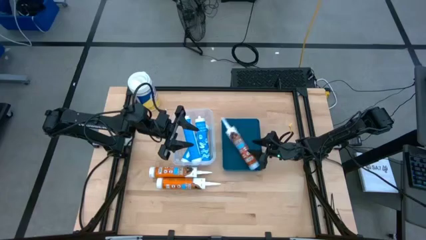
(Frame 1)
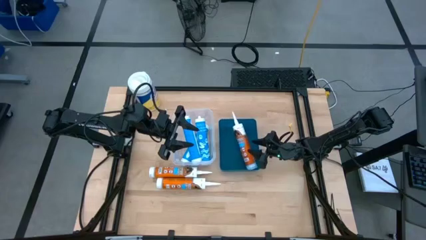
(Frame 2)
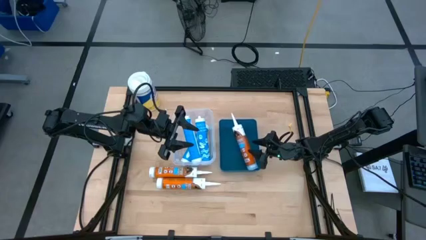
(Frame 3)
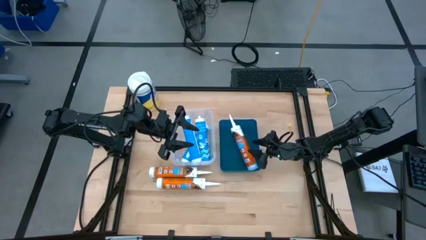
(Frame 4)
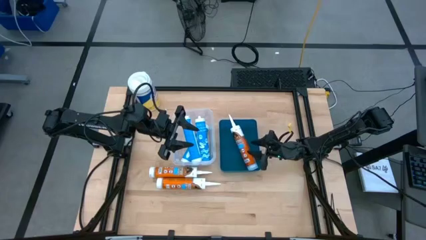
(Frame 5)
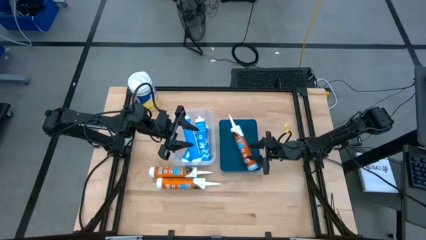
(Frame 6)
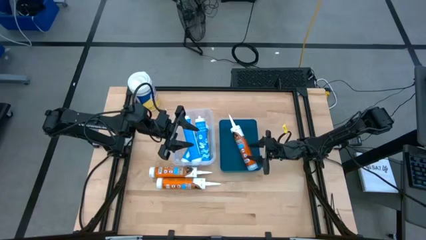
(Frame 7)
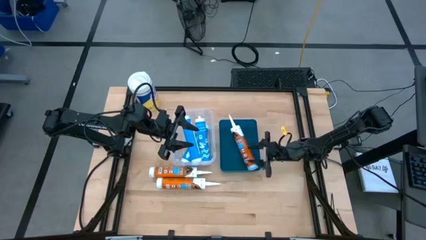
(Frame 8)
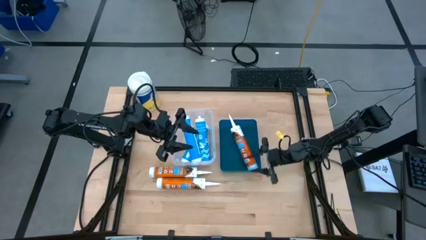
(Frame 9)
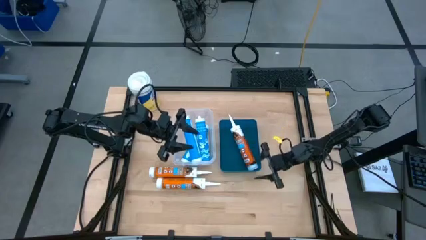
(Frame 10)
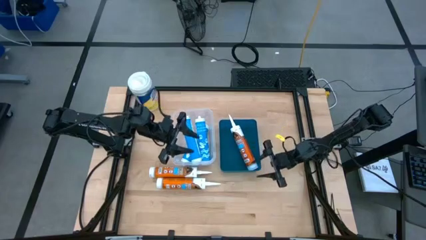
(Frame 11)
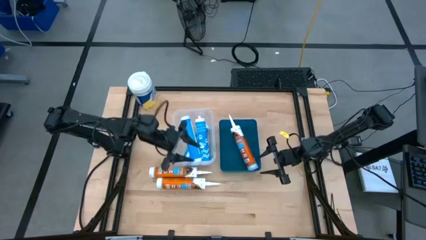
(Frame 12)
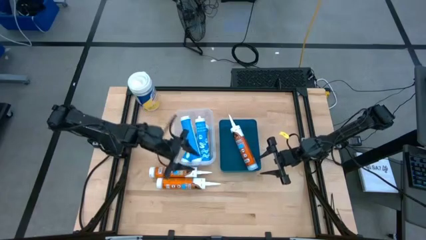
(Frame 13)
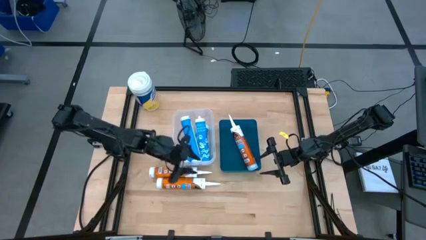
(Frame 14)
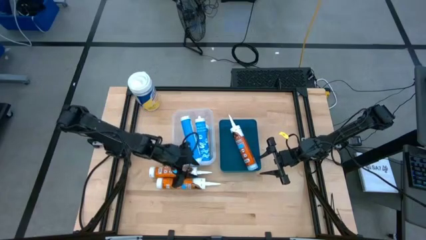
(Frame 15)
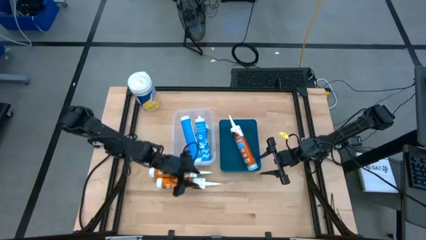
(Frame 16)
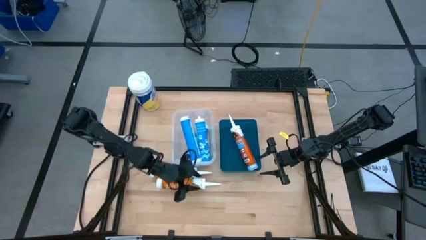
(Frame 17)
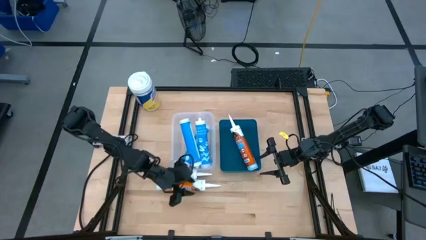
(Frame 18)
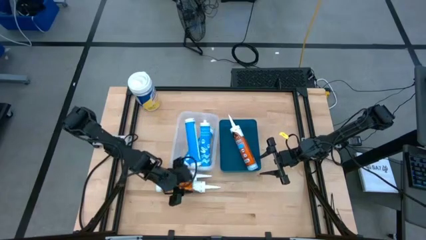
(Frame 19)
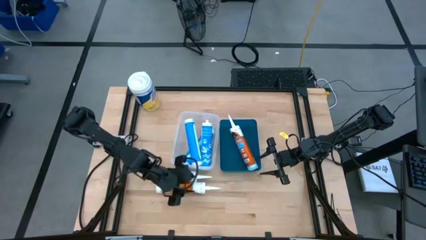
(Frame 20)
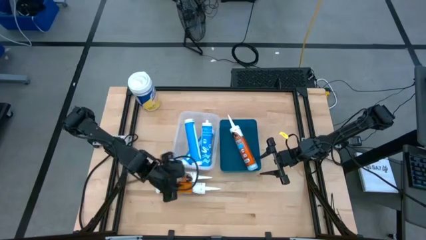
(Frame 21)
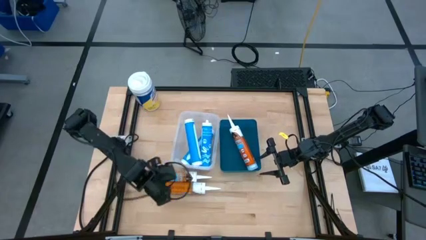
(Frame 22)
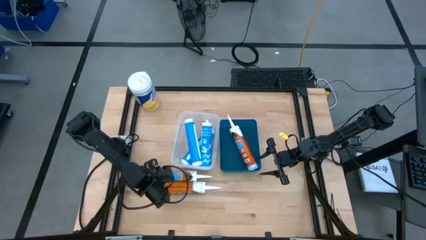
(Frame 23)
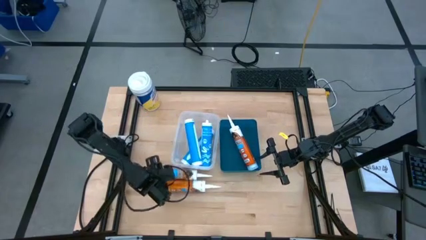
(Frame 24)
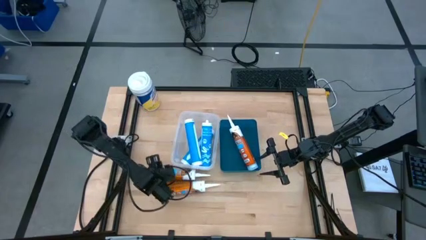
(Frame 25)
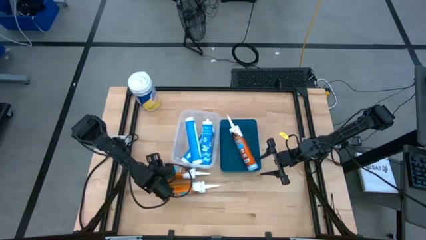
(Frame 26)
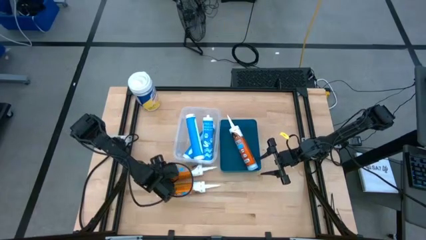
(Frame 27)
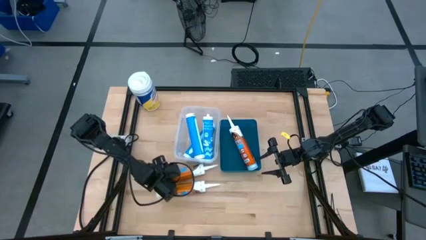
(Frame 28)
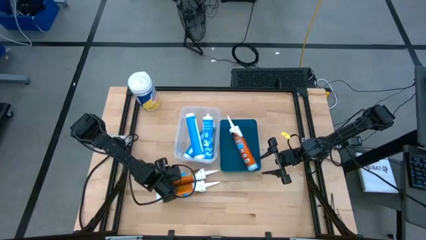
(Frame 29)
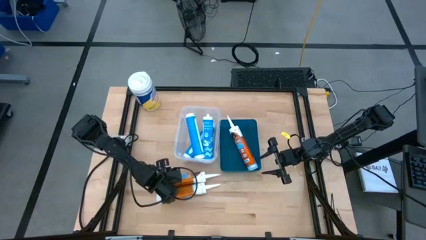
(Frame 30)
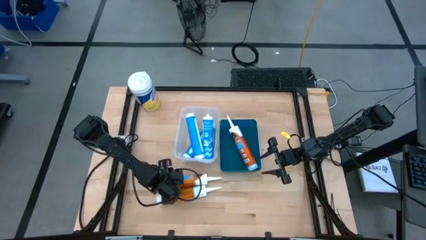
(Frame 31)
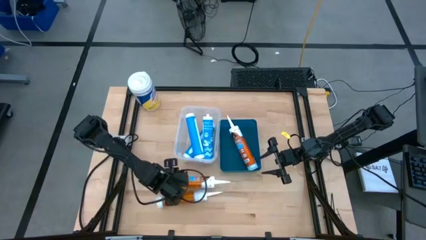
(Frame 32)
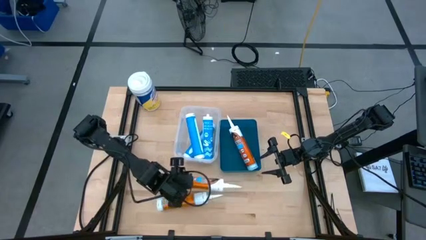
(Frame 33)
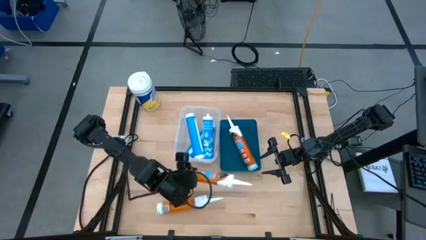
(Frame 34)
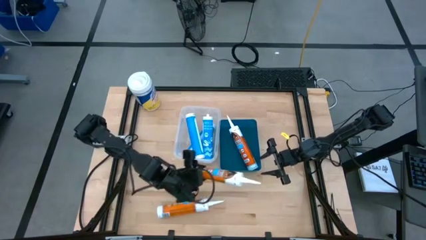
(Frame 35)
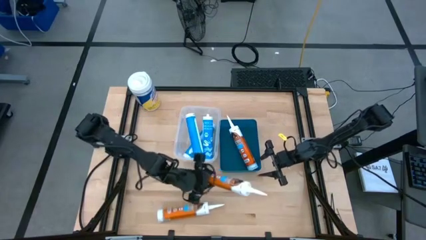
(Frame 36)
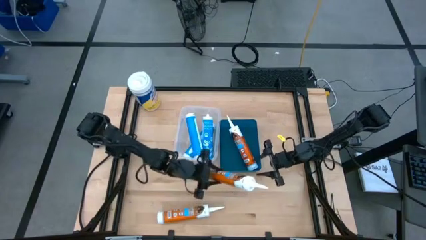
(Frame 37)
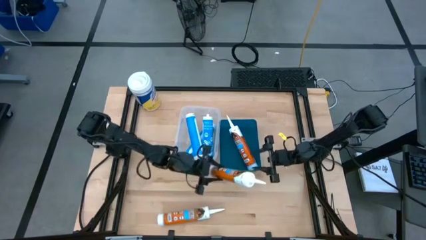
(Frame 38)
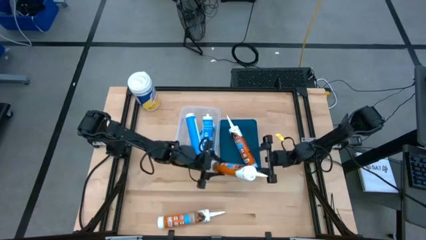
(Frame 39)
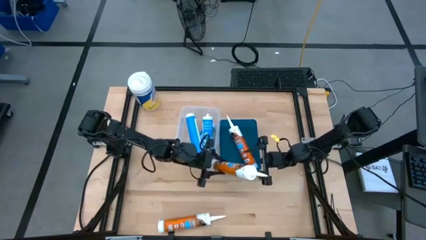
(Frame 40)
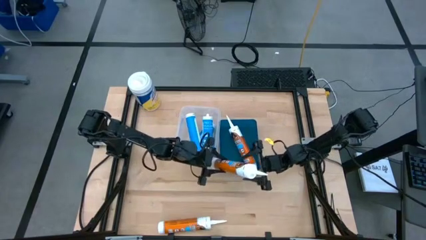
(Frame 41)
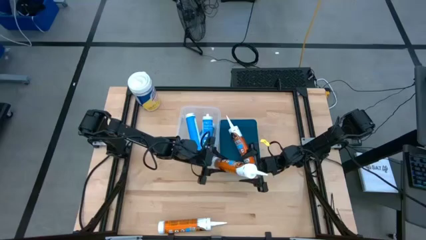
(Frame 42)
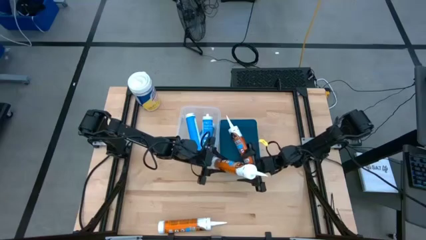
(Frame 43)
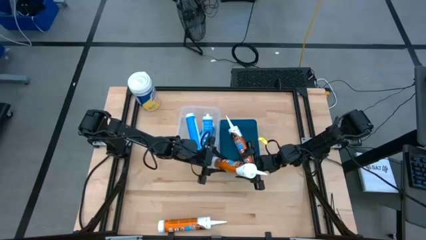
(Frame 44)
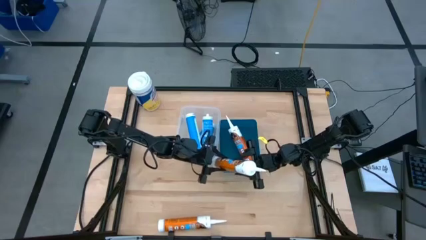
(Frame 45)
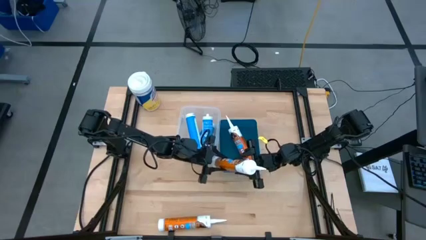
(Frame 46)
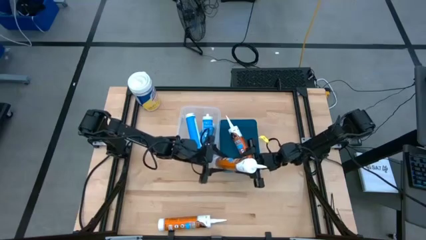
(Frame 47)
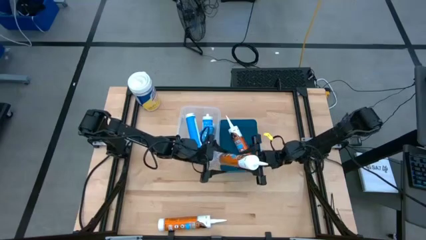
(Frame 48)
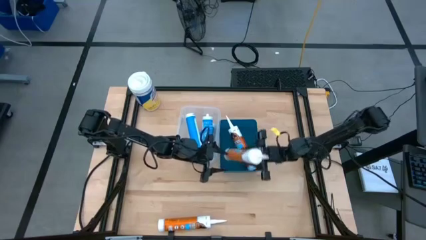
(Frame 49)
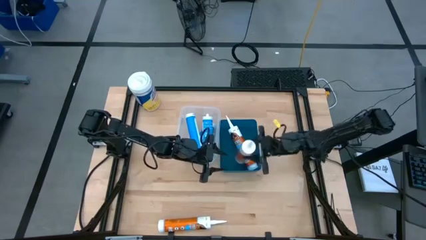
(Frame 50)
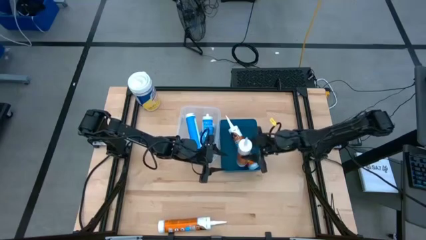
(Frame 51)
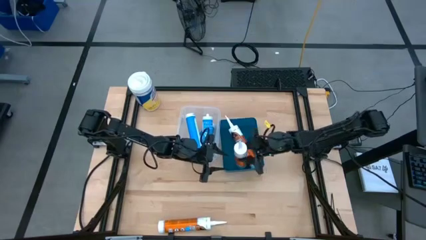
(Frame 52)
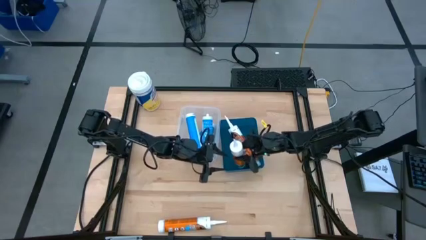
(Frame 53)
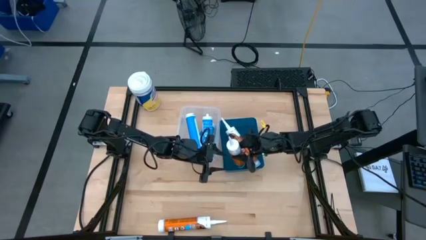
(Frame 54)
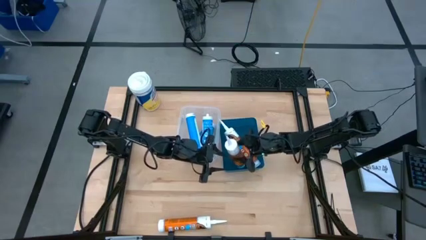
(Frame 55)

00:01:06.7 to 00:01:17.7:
Task: Pick & place silicon tubes, Sealant and Lysol wipes
Put the top orange sealant into the blue bin

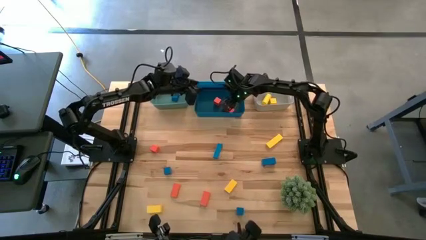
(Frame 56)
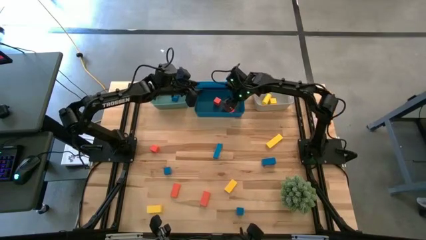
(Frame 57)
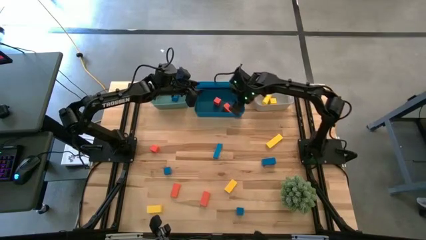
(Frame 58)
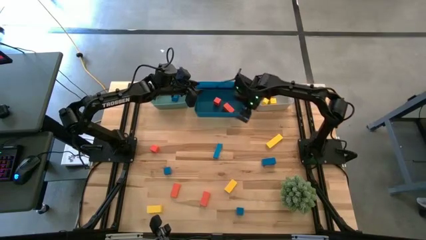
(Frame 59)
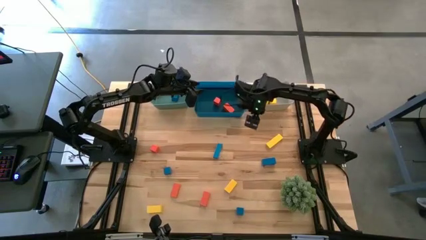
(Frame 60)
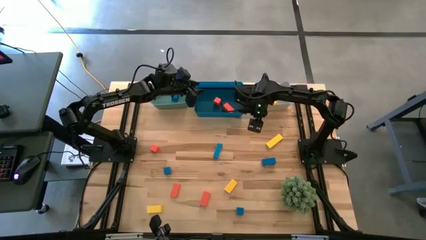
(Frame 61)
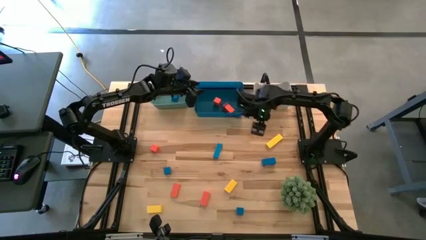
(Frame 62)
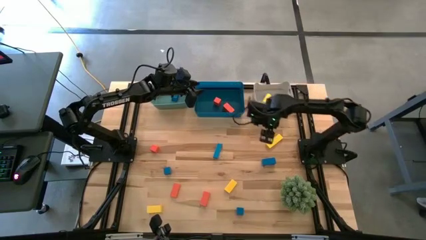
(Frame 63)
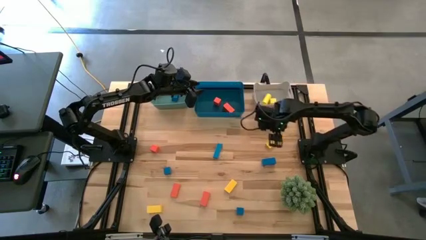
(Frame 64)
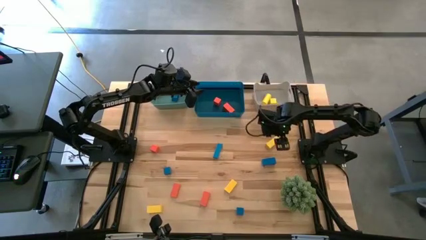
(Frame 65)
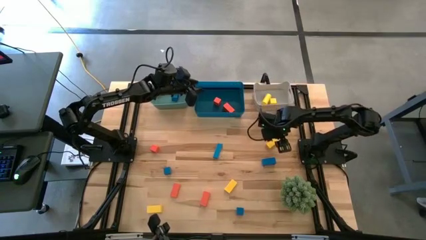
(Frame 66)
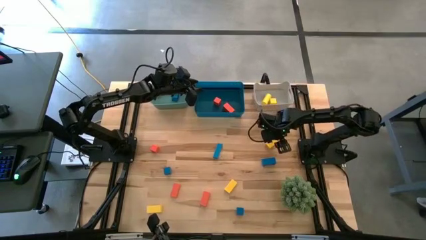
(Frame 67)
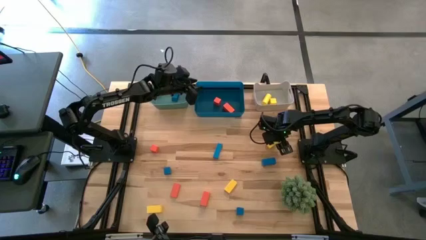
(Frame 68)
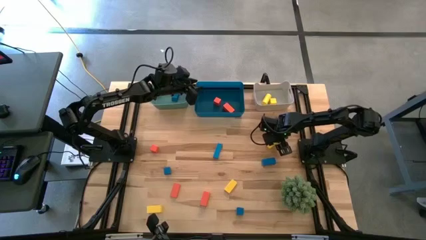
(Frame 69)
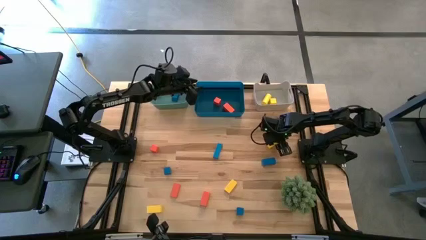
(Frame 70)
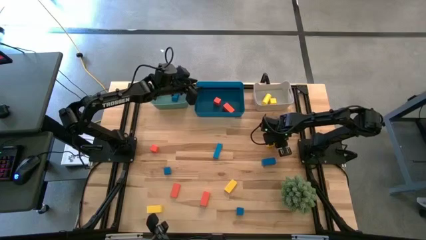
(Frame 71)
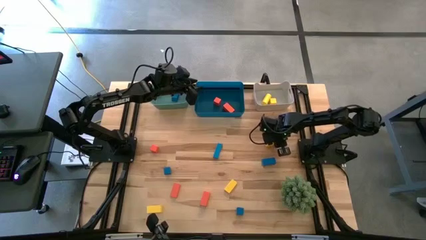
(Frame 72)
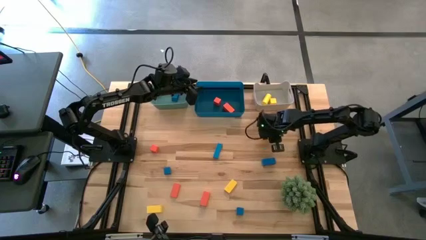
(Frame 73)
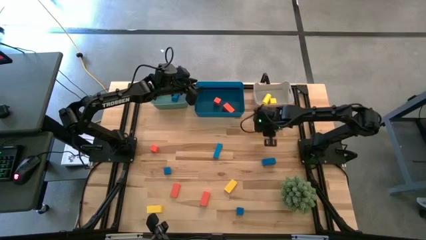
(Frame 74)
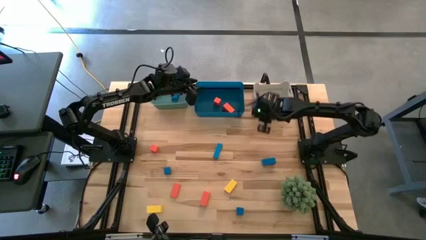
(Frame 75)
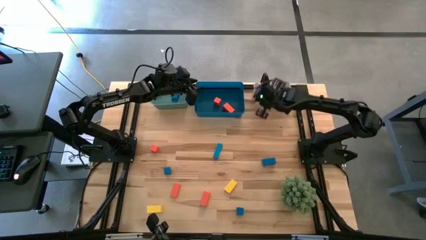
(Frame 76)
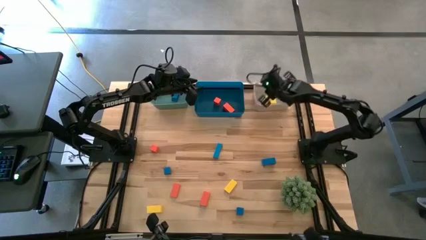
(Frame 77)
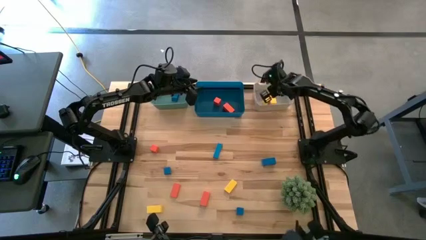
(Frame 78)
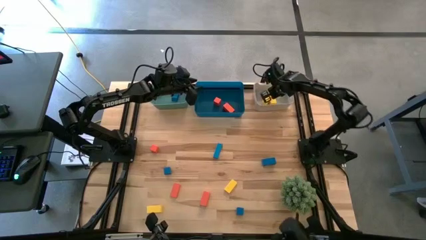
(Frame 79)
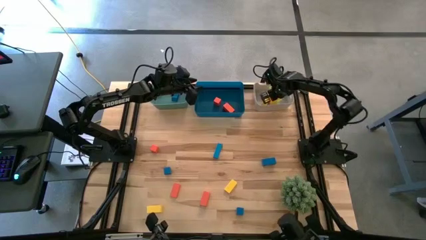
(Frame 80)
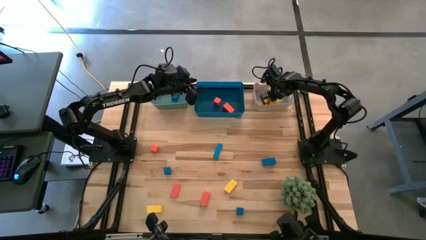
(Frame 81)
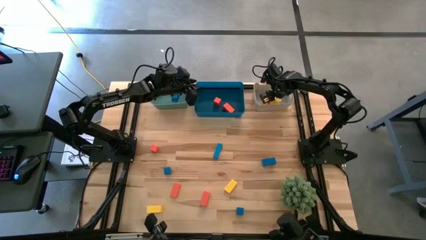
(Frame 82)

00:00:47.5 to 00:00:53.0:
Task: Sort & place blocks by color
Put the yellow block into the white bin
